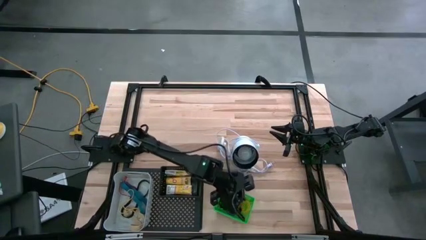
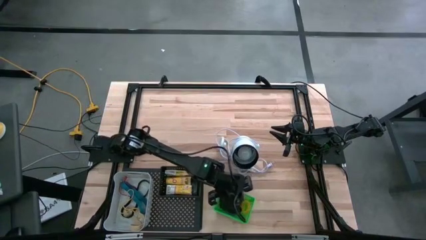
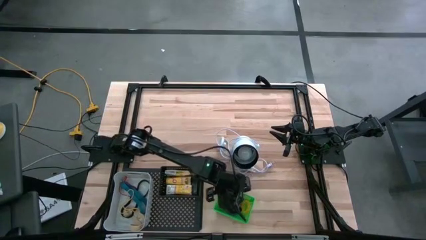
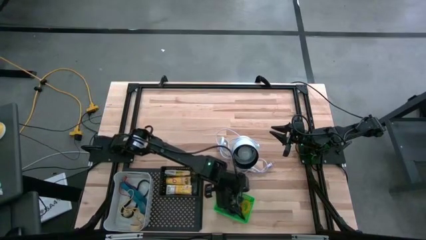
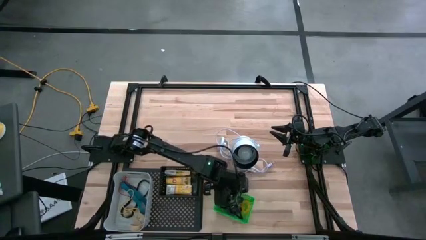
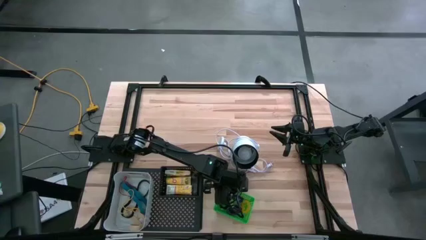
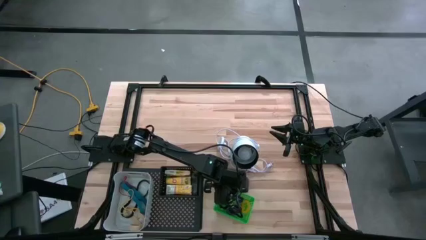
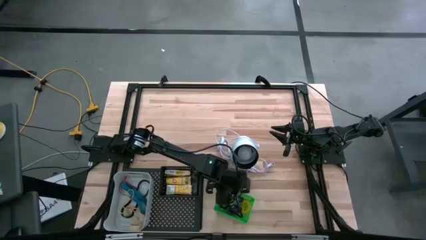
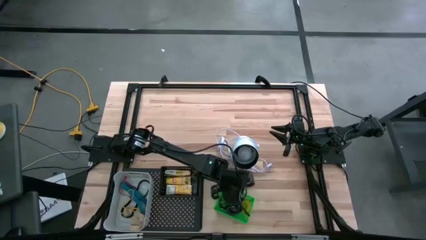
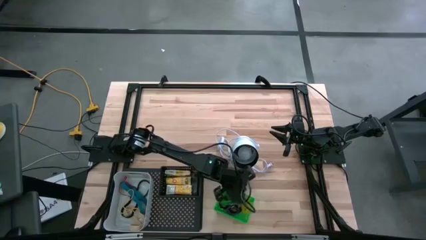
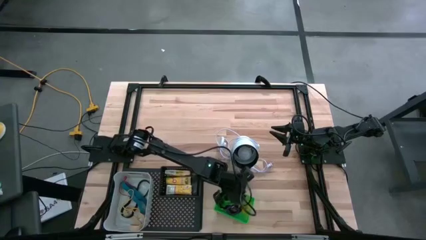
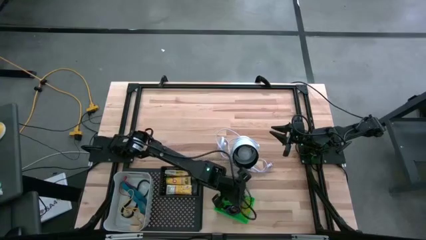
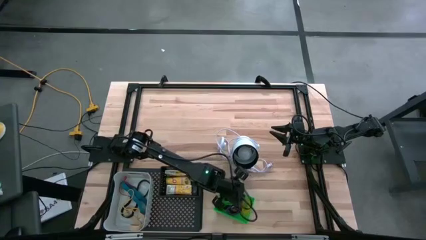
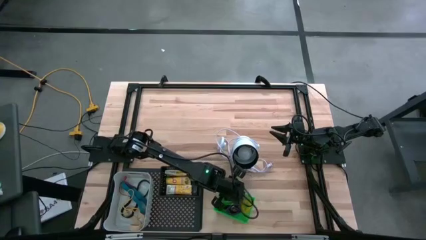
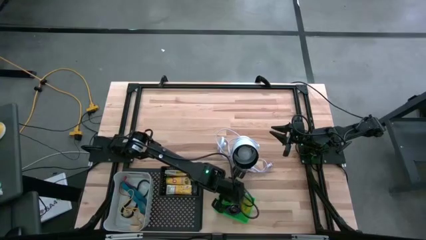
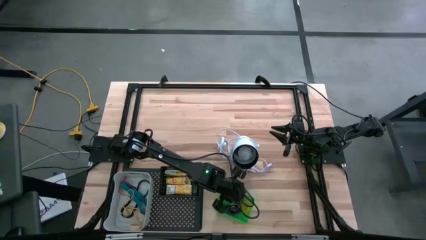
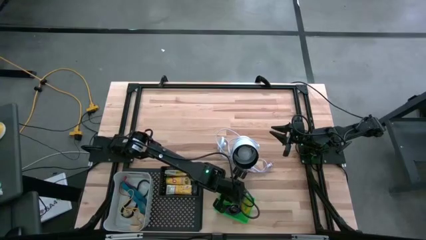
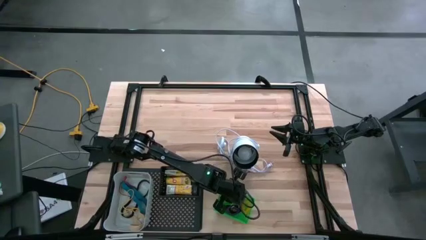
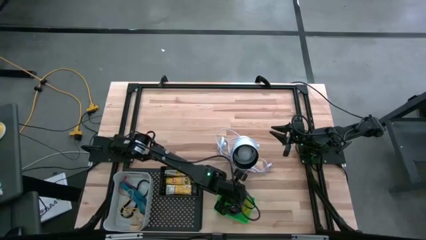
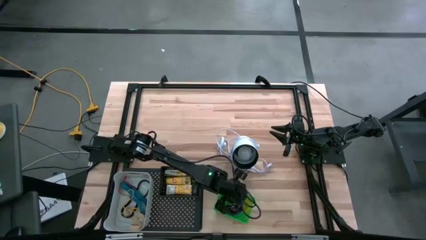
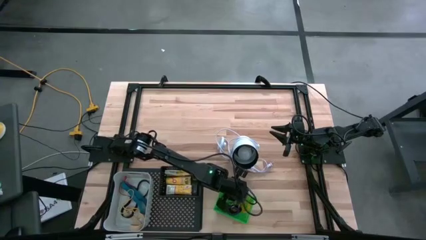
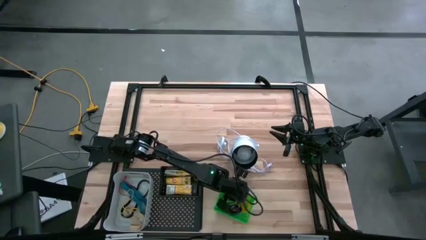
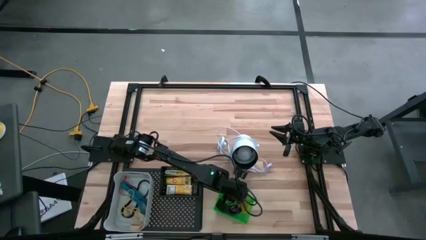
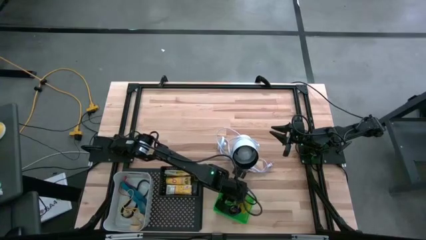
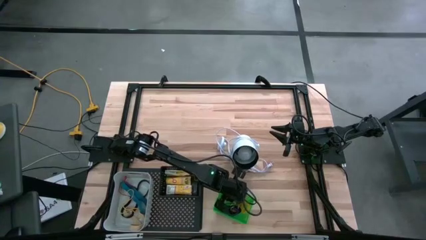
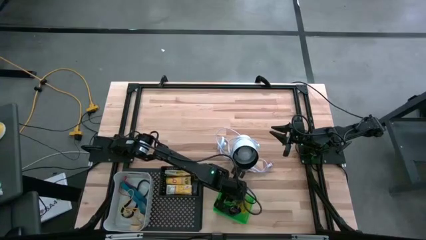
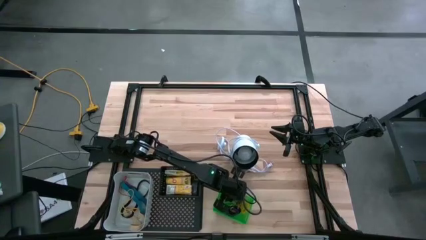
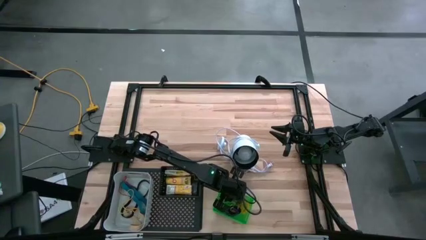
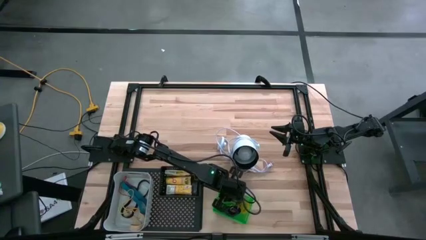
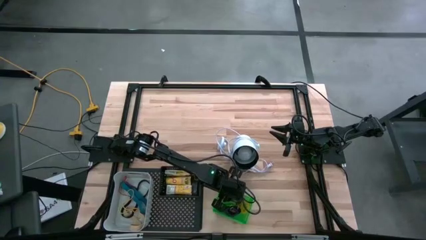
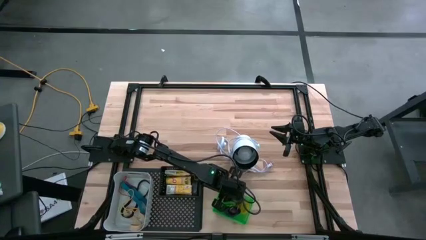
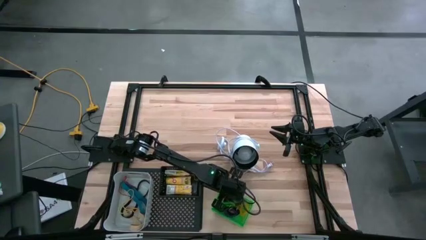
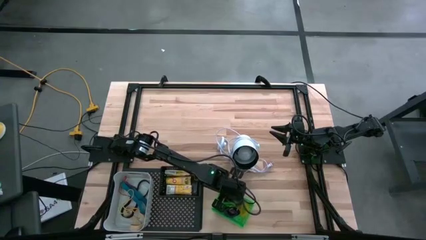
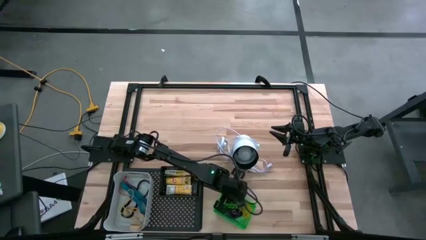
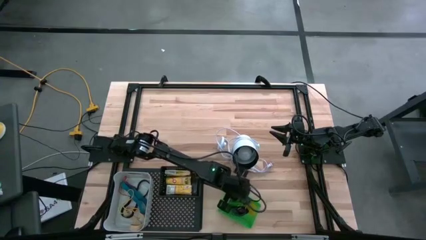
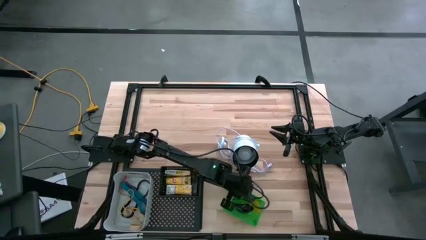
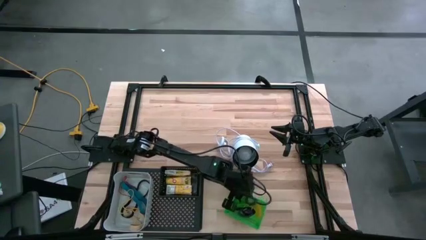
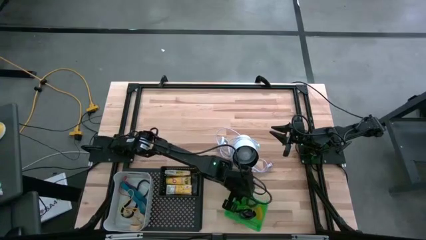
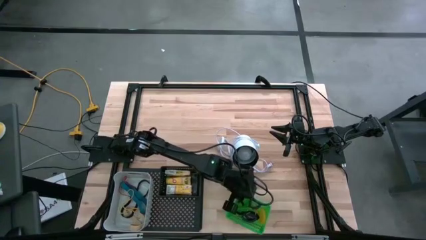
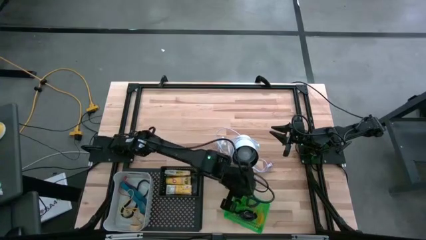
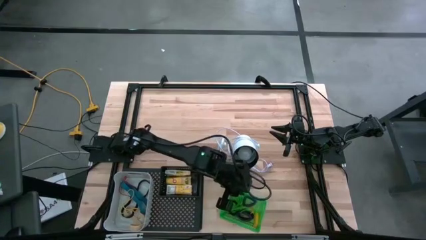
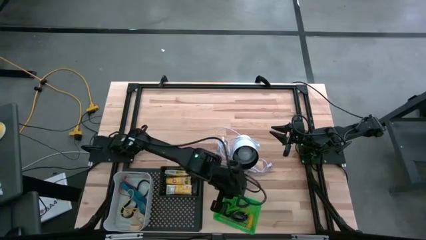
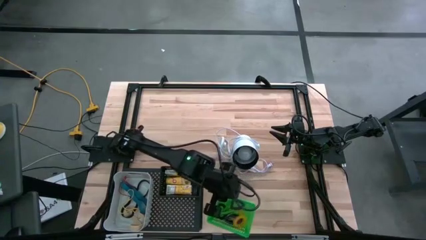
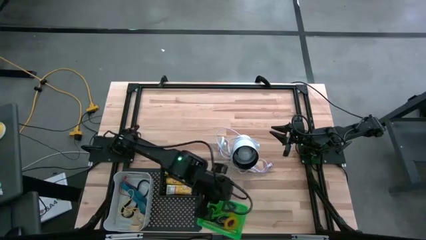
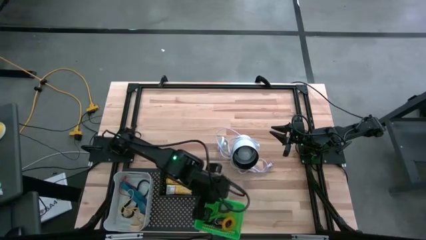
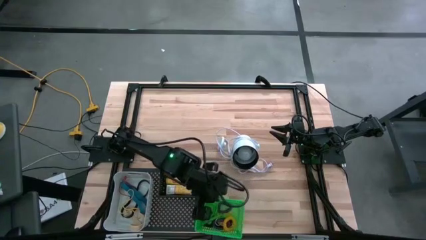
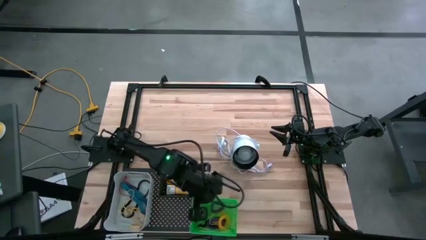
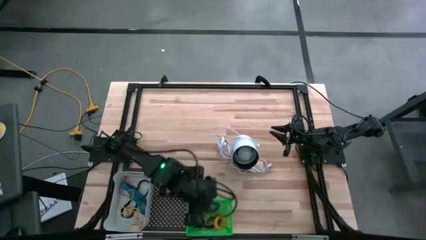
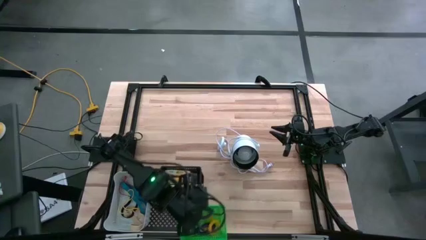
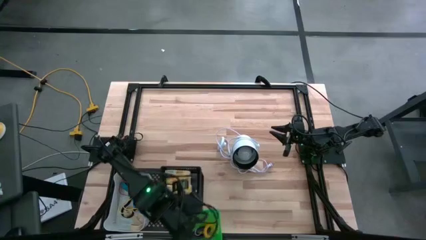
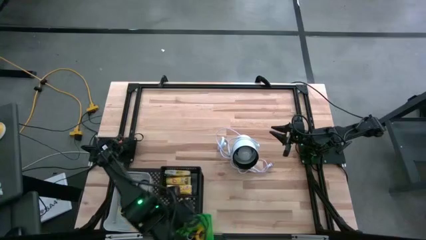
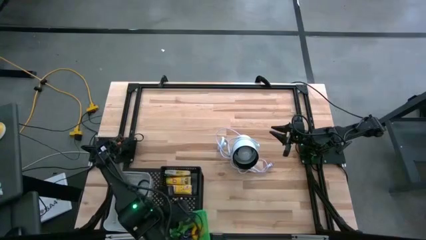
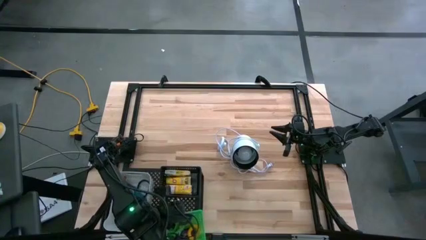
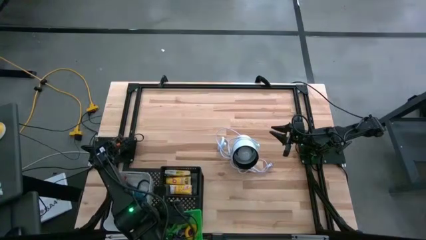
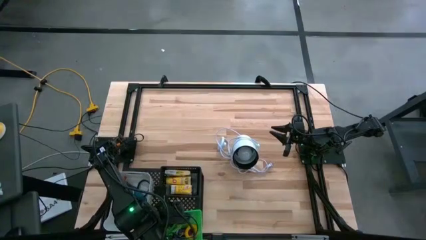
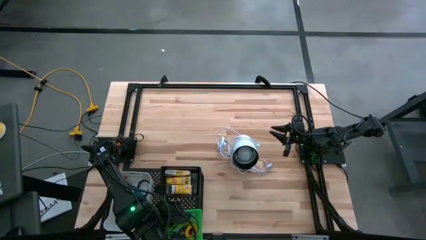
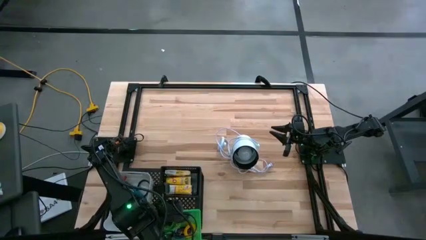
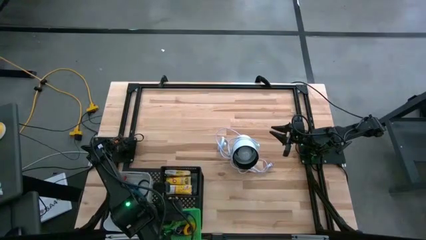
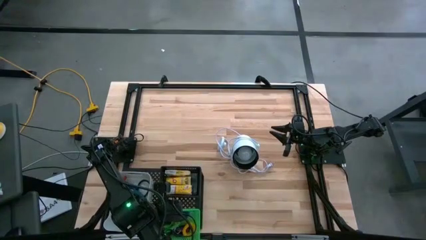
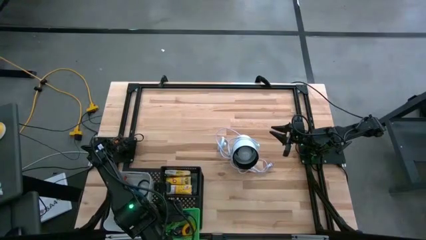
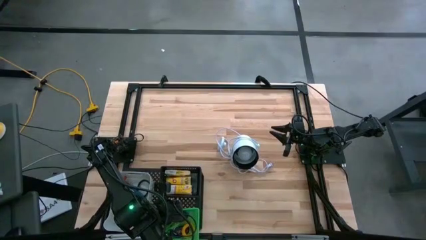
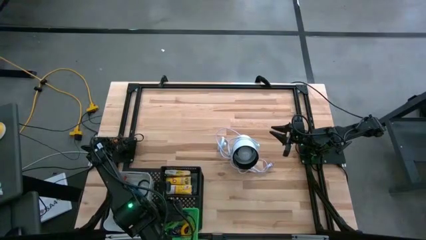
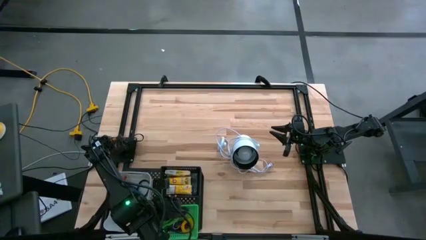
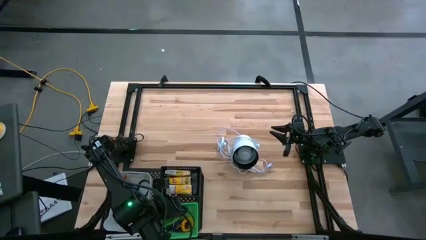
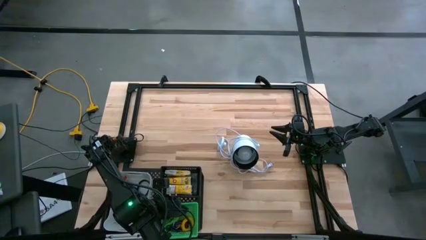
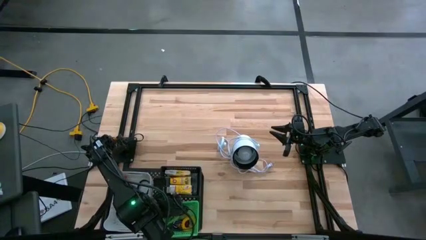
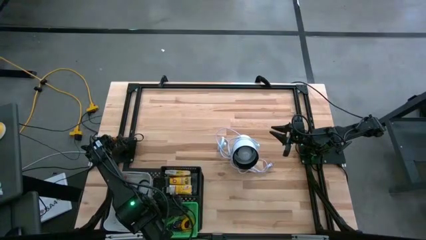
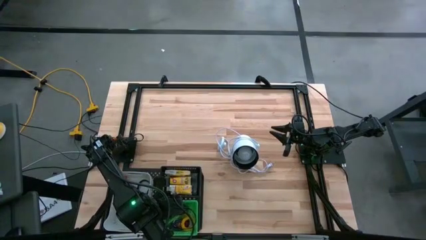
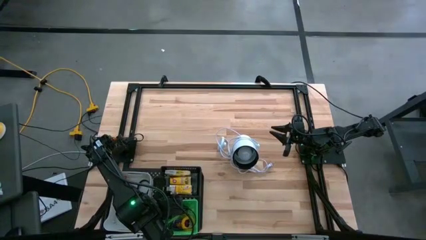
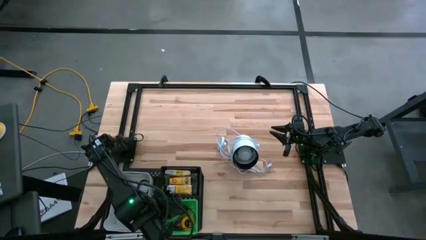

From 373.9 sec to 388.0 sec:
Task: Pick & Place Office Desk Supplies
Put the green bin on the shelf

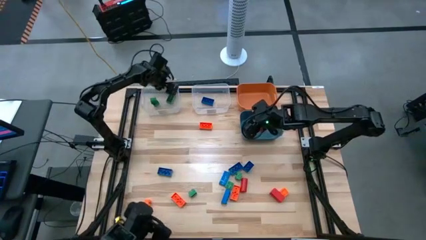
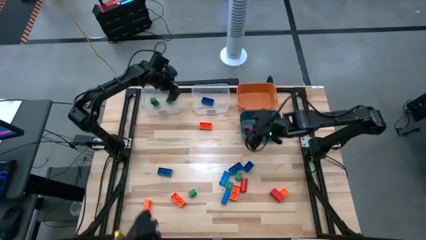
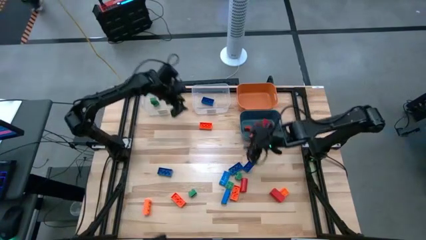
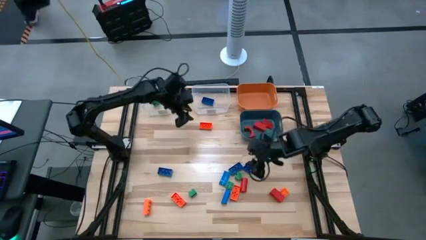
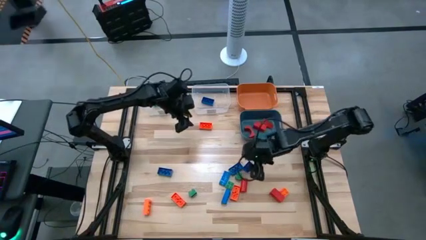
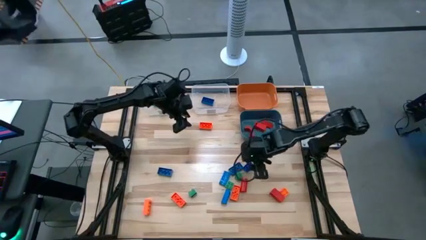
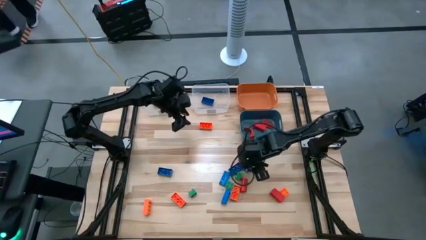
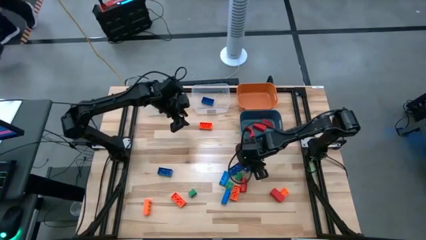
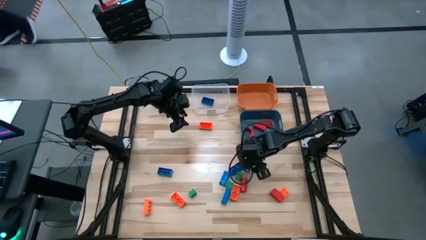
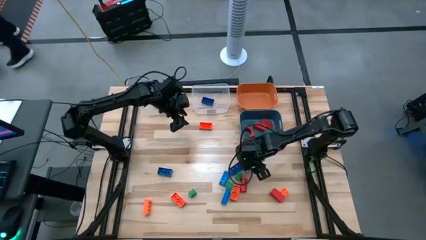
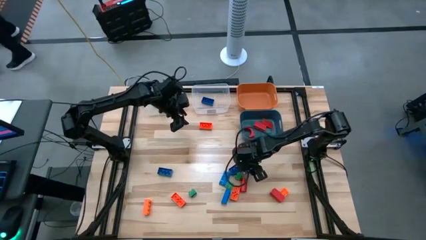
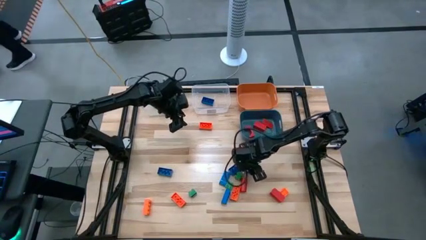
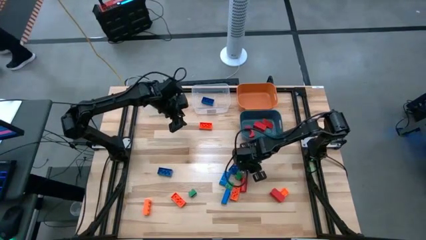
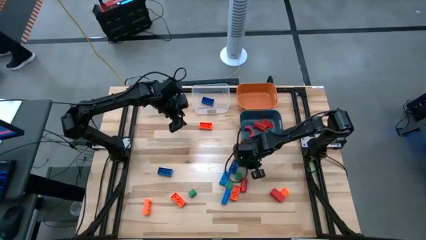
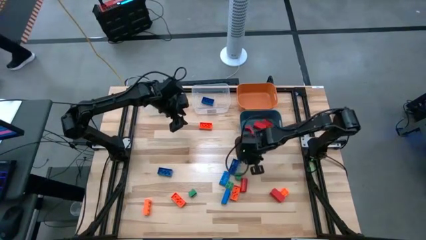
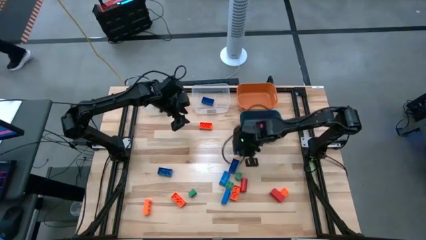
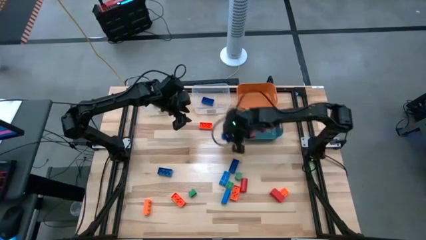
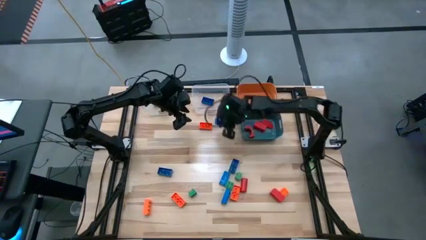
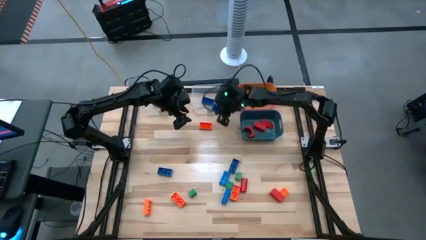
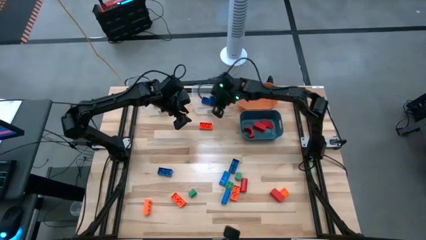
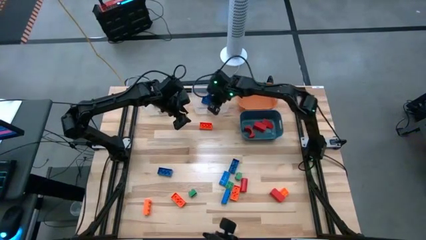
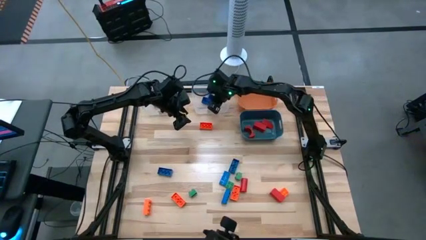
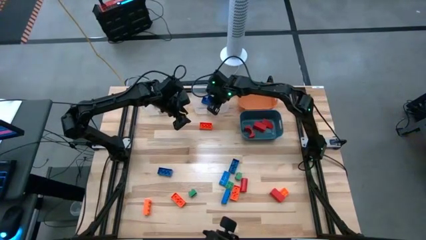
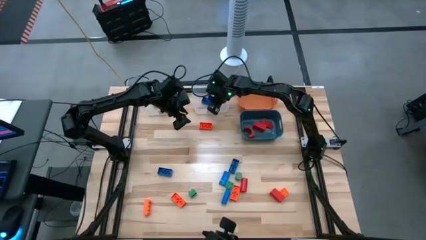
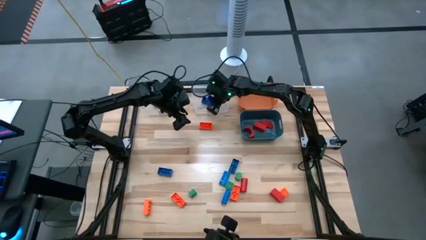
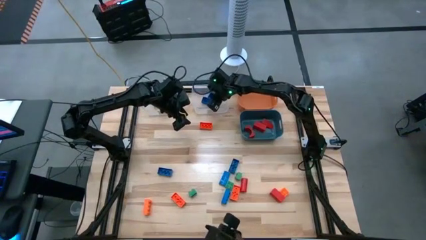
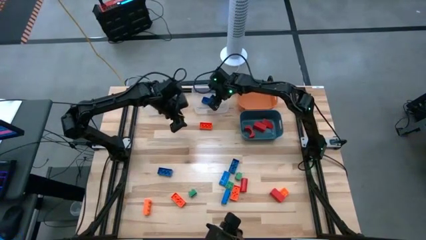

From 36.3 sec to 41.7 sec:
Task: Sort blocks
Put the blue game piece into the right transparent bin
